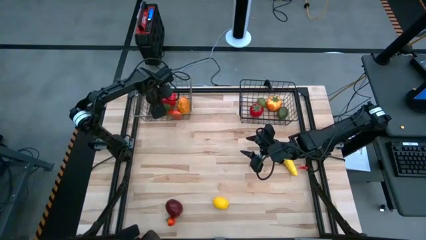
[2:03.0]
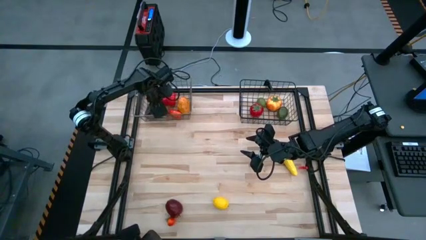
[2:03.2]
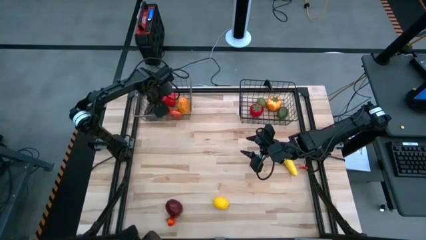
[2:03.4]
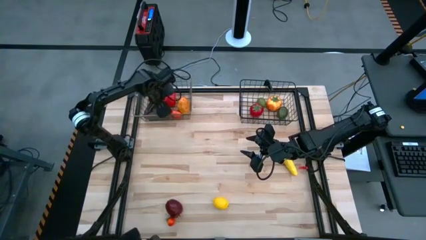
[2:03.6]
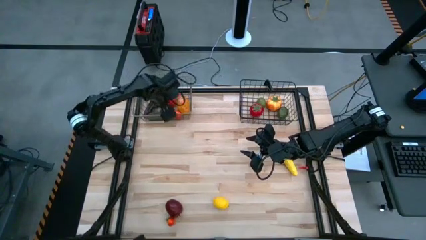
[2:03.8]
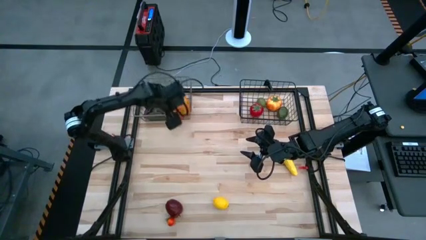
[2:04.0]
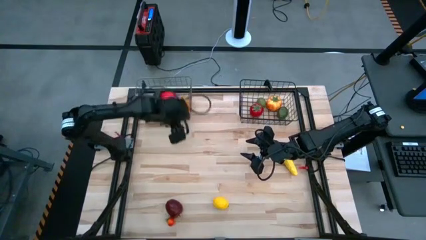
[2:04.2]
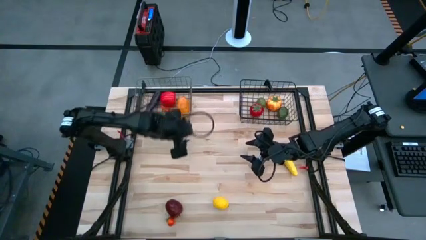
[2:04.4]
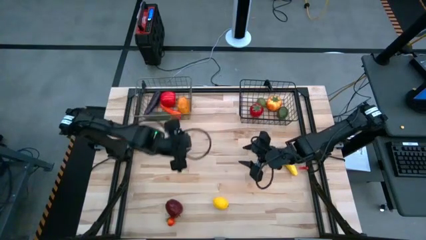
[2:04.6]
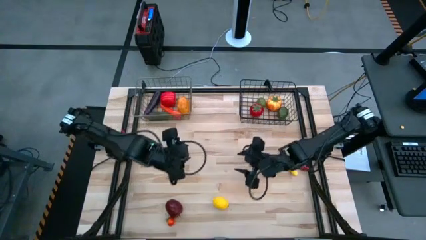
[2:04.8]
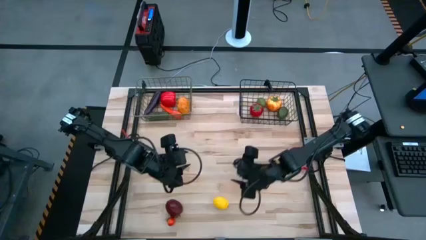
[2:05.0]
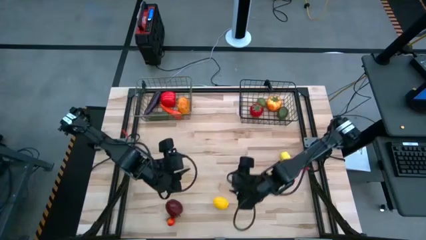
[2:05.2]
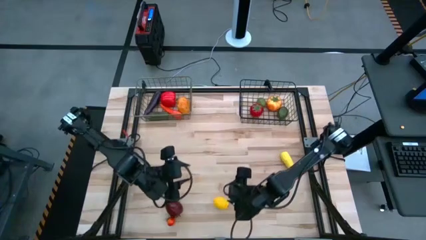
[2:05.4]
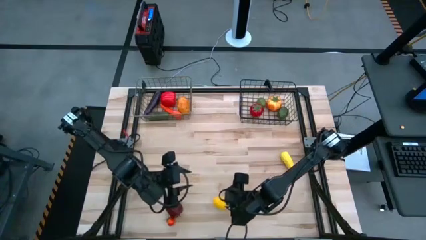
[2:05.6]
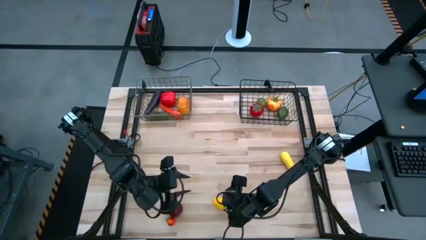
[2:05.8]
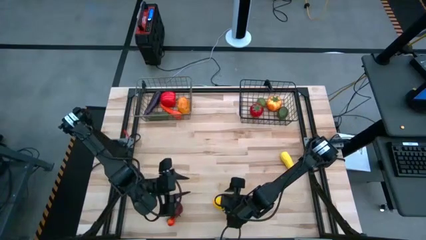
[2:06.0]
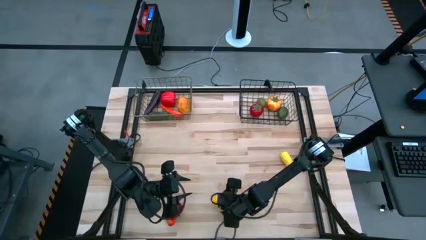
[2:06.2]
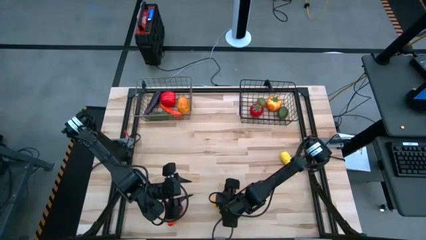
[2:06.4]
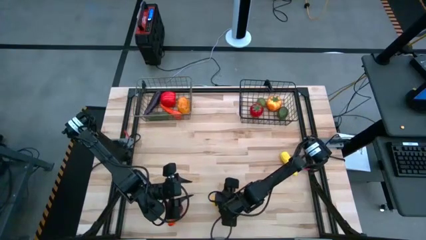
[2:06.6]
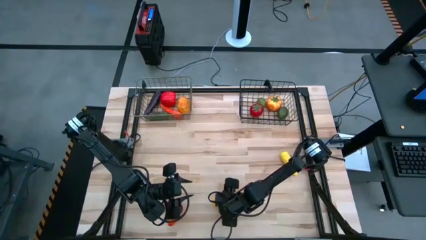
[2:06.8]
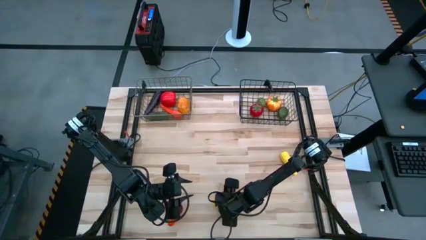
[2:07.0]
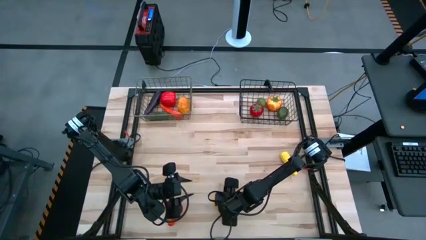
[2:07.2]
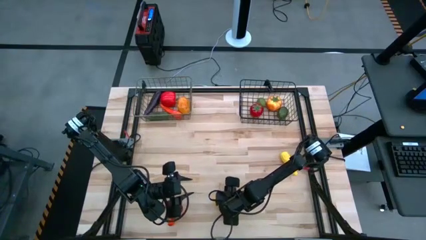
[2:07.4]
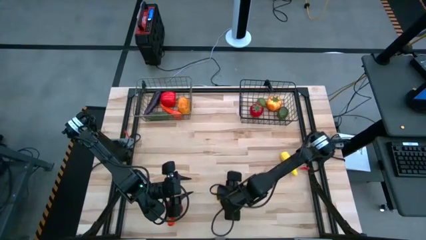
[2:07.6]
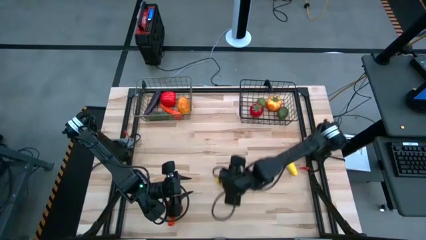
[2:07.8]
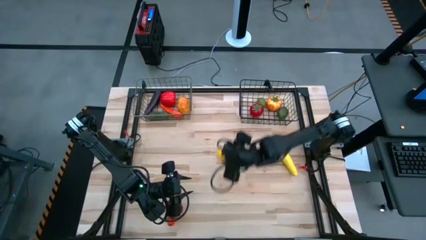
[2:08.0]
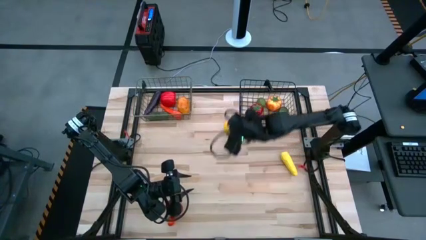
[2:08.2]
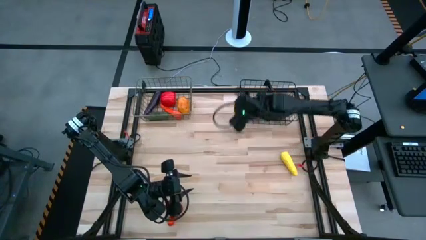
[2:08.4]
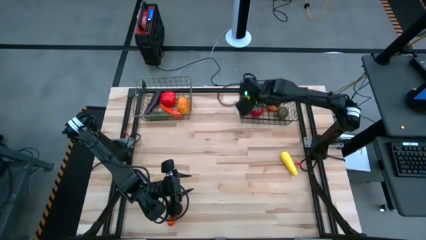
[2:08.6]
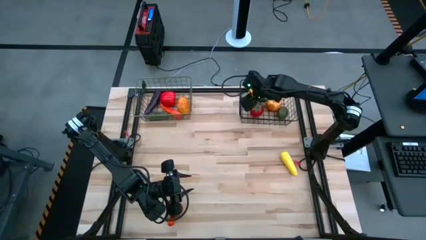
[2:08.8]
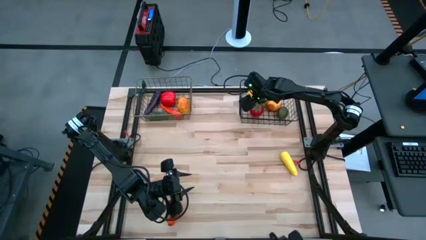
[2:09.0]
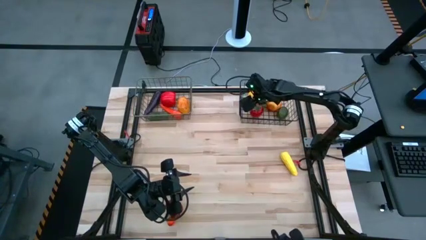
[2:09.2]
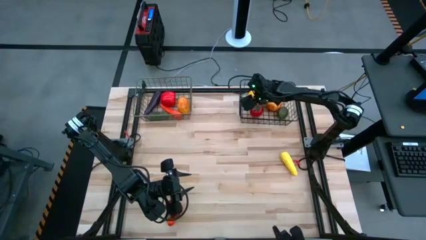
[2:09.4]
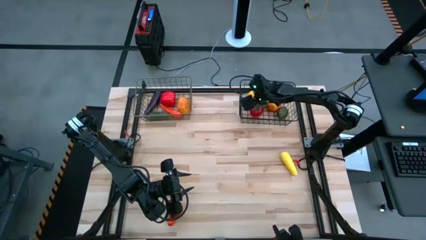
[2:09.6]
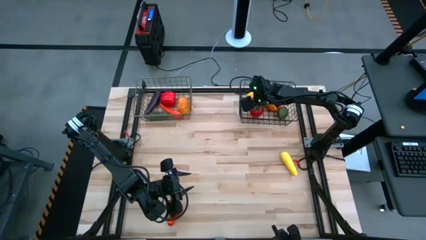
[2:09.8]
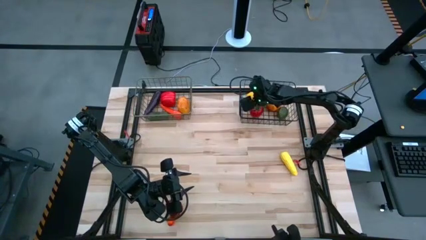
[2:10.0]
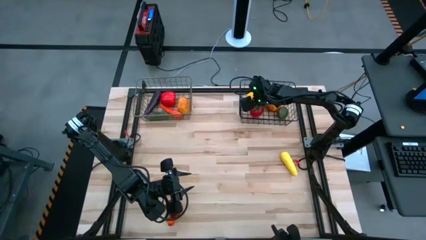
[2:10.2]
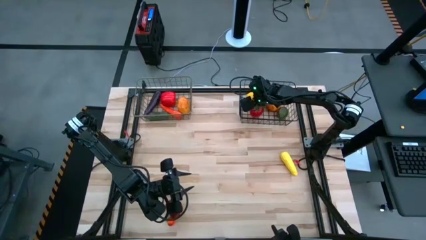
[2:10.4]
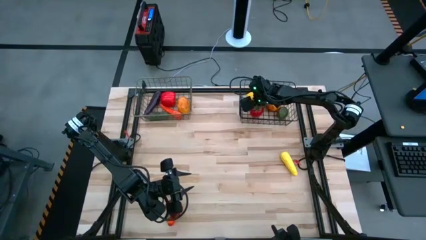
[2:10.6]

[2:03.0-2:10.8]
Task: Sort produce into baskets
Put the lemon into the black wire basket

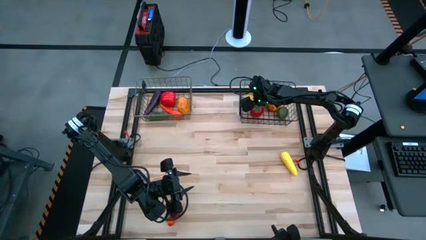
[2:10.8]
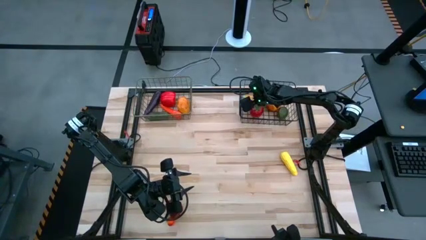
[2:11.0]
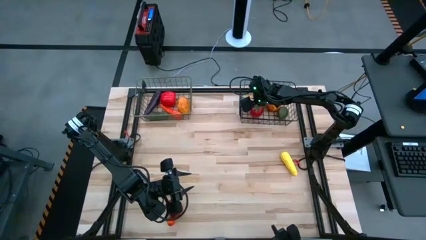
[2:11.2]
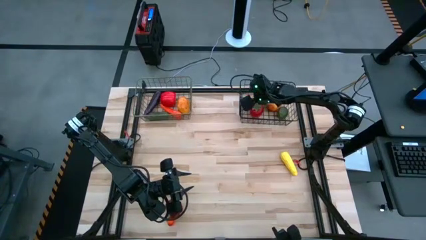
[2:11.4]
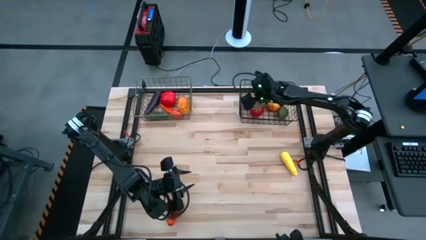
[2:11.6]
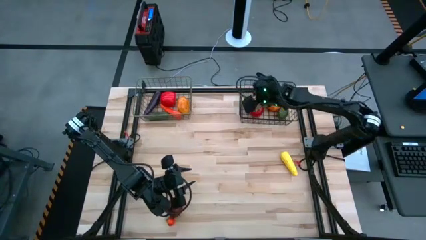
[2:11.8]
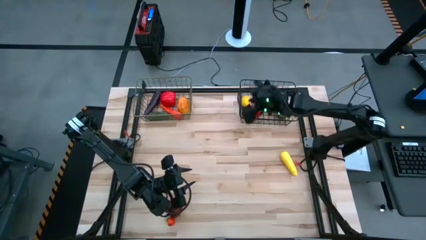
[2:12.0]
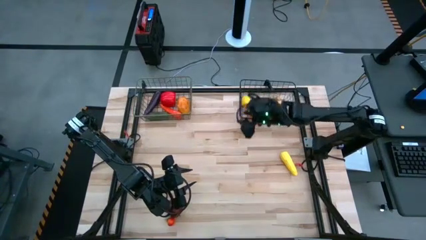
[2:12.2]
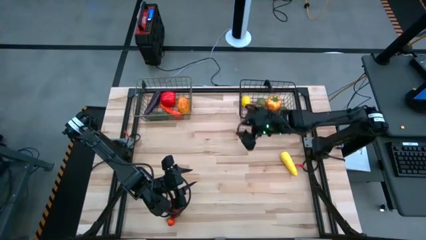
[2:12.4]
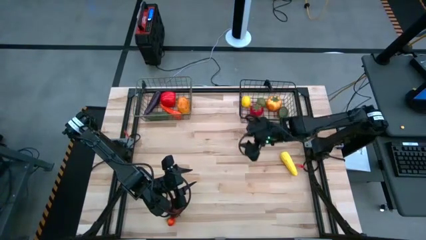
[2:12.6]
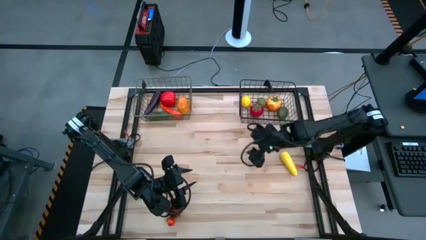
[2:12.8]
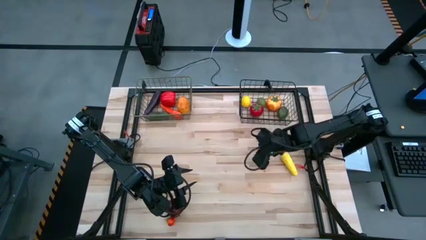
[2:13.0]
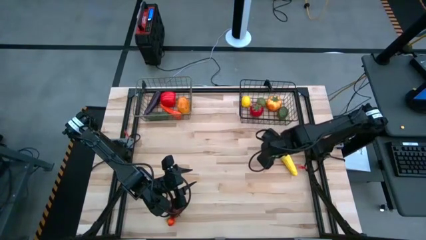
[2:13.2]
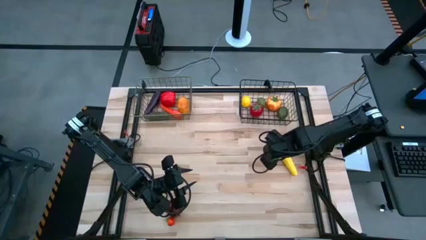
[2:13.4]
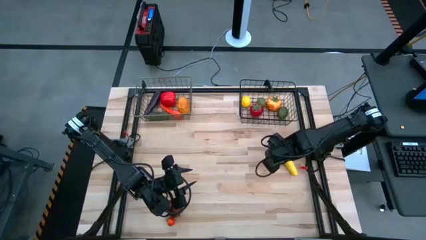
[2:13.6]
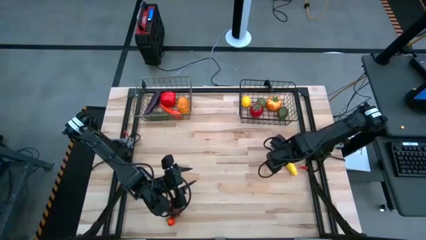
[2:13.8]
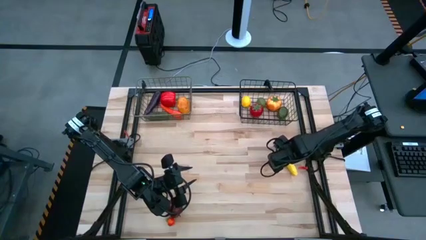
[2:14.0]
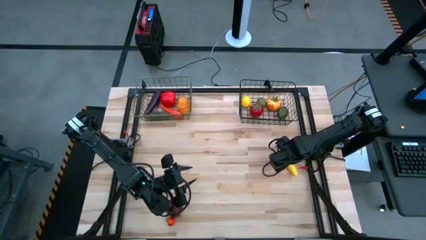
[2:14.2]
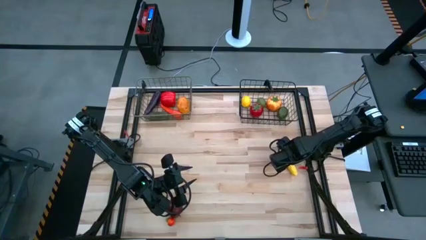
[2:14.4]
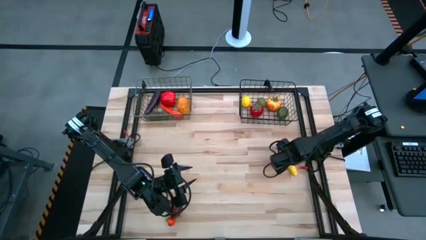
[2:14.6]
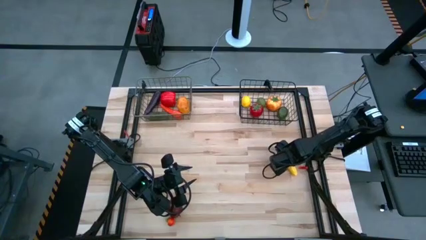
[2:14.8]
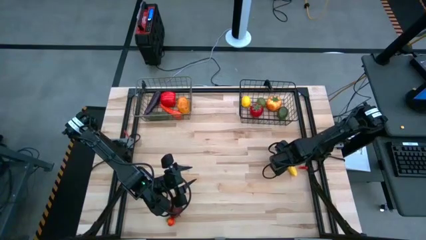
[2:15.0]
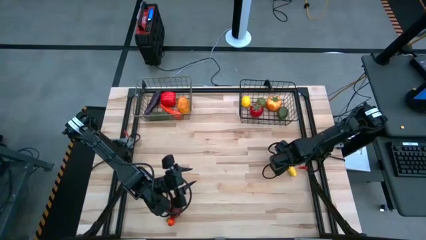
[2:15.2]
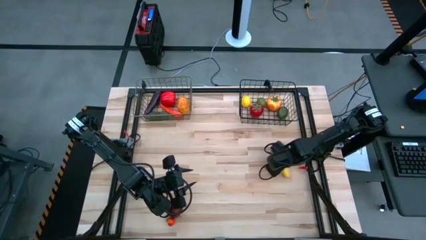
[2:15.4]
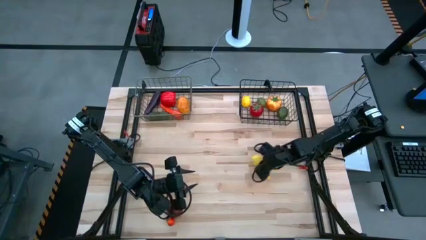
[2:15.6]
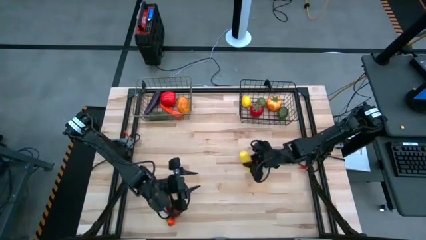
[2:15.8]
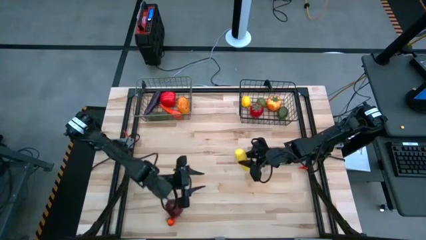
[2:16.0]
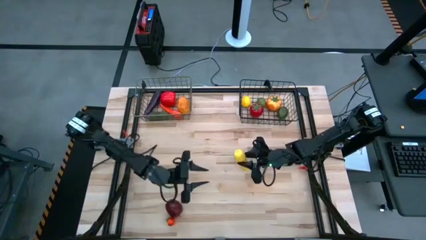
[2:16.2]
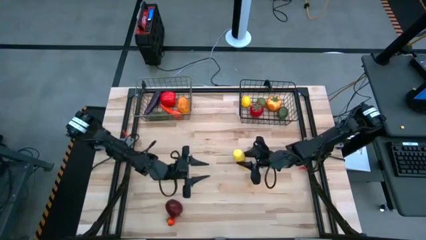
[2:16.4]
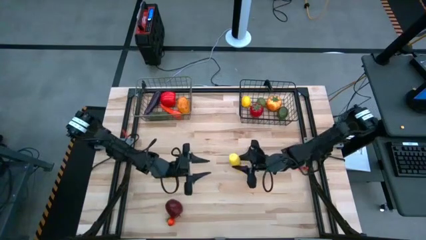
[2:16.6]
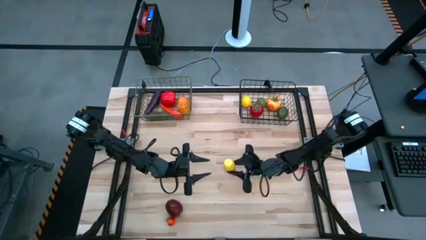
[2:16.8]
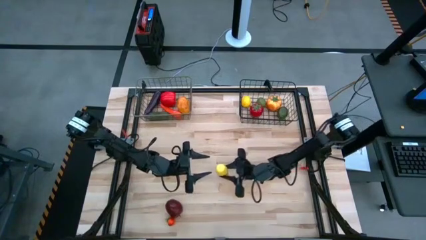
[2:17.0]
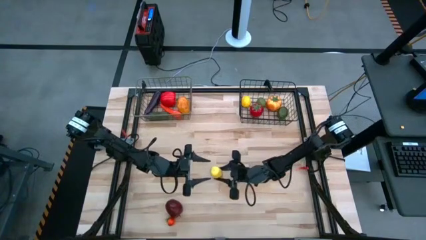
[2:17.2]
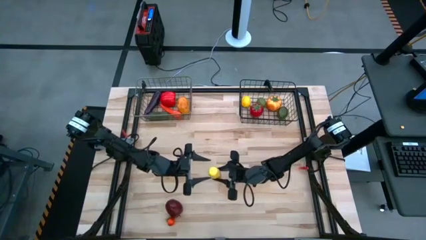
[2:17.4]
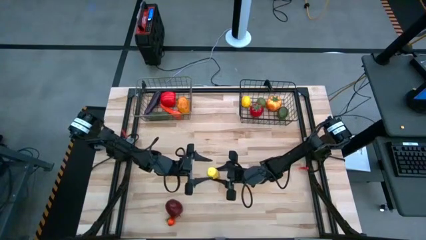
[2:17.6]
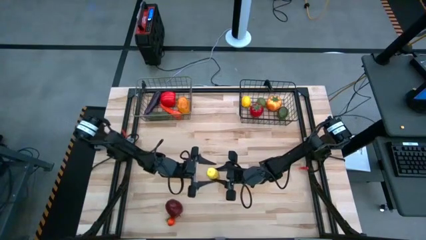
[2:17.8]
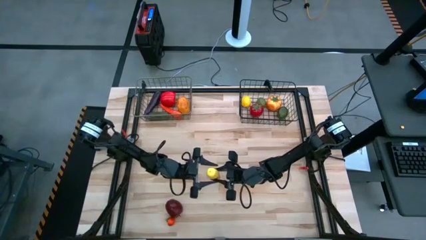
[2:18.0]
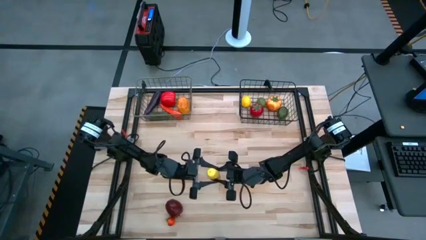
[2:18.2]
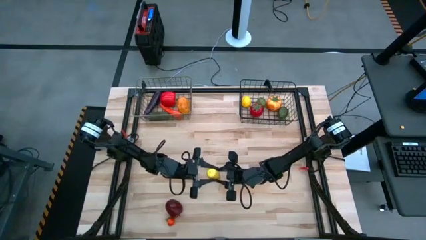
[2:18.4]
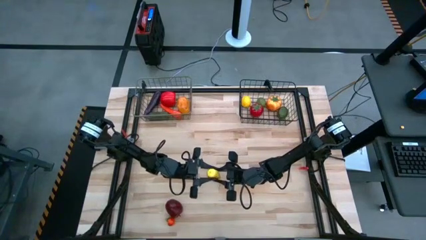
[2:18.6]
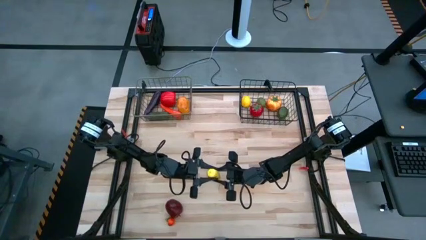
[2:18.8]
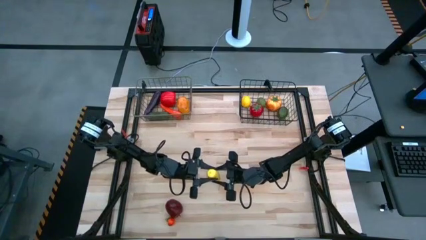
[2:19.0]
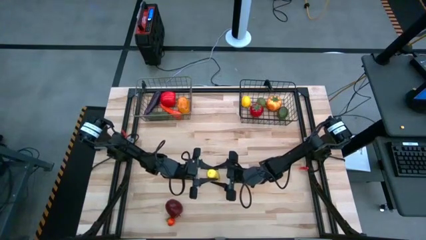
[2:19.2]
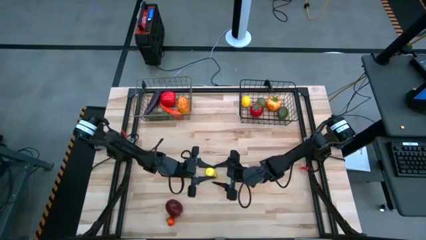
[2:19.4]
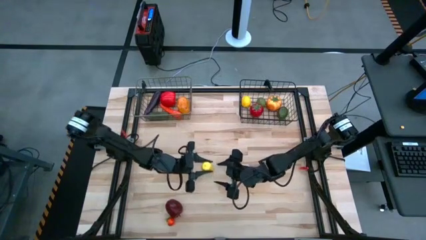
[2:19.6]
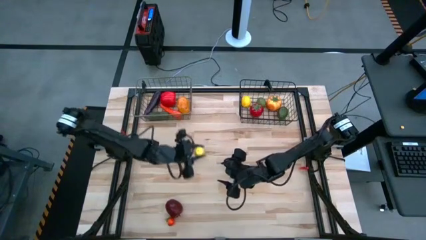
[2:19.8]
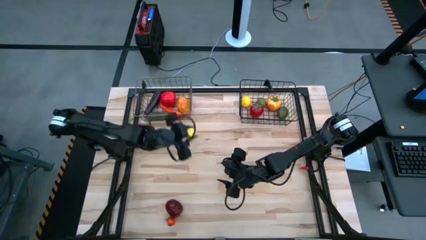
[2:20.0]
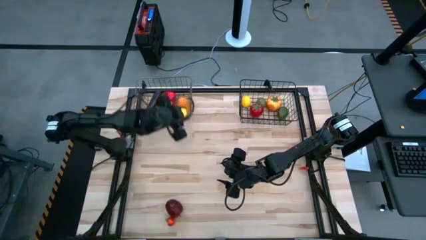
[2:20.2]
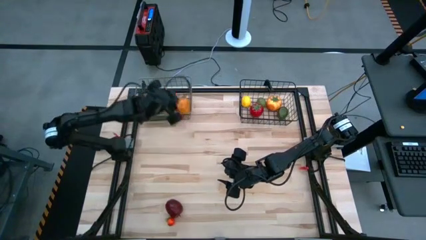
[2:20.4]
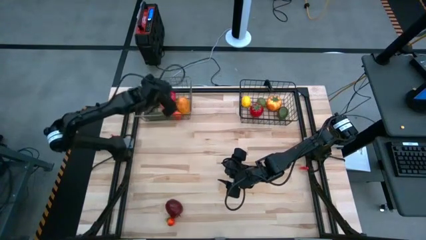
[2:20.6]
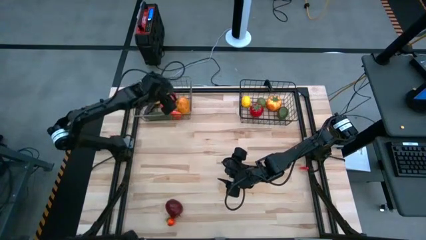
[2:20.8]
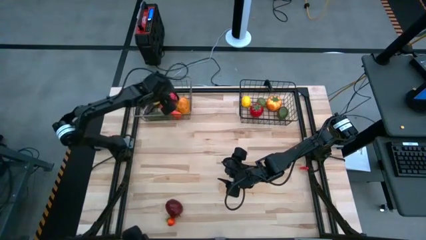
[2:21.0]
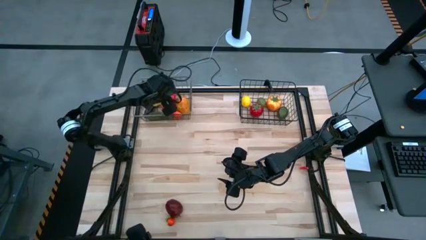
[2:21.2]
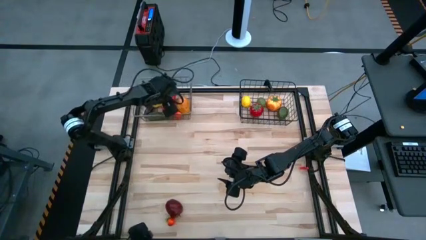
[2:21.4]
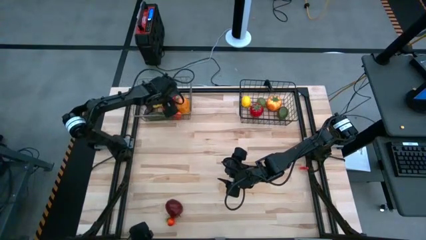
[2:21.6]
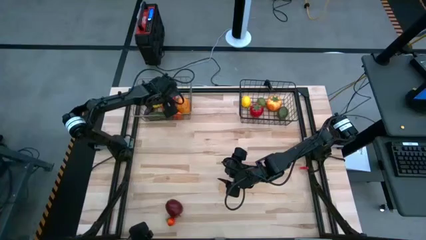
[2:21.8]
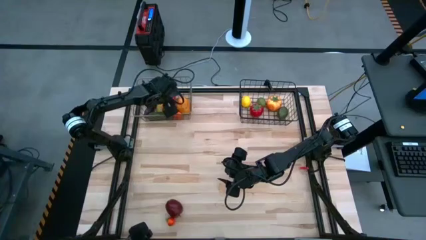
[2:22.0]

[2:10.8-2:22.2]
Put the corn into the brown wire basket
